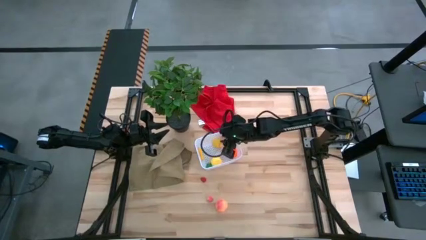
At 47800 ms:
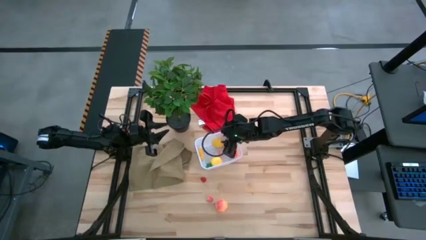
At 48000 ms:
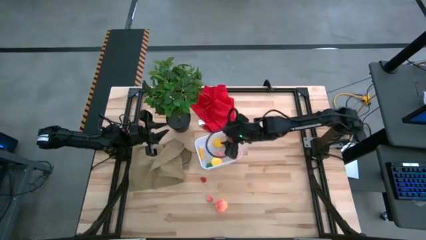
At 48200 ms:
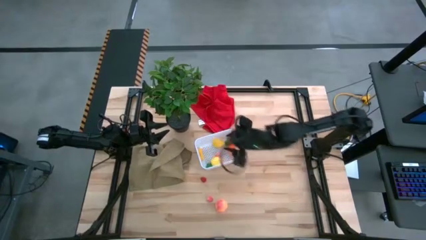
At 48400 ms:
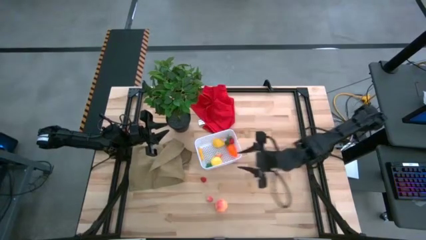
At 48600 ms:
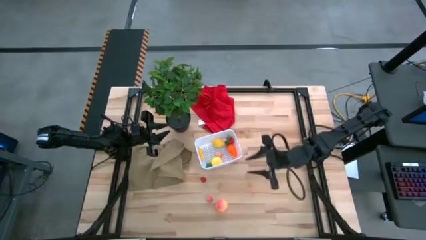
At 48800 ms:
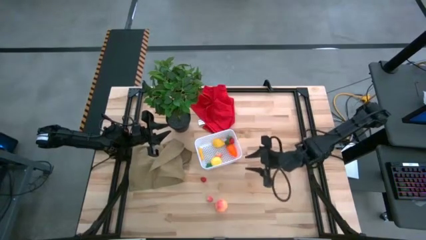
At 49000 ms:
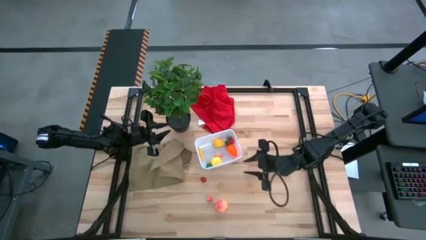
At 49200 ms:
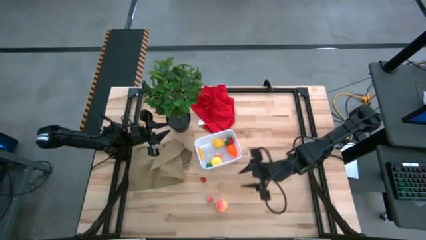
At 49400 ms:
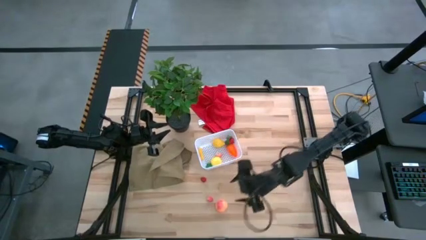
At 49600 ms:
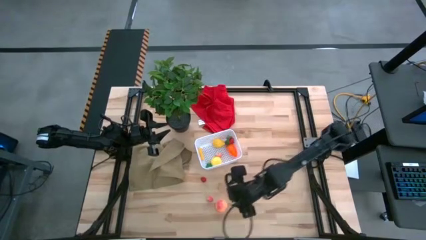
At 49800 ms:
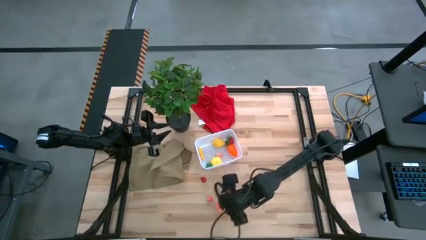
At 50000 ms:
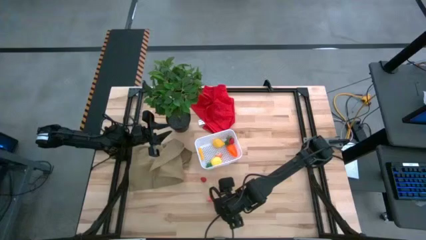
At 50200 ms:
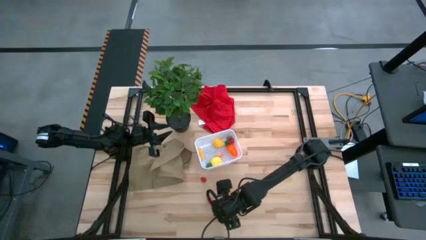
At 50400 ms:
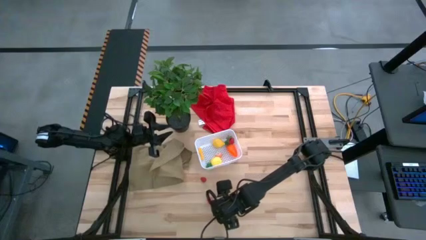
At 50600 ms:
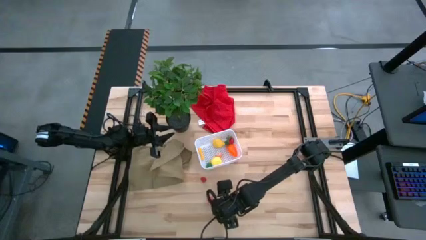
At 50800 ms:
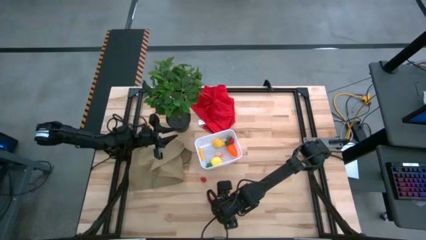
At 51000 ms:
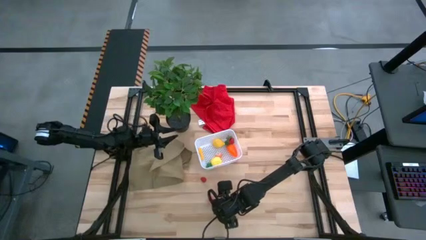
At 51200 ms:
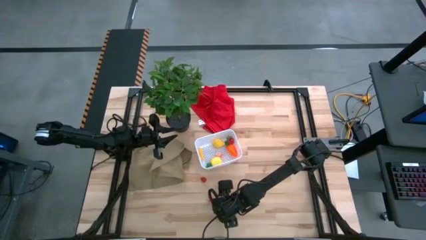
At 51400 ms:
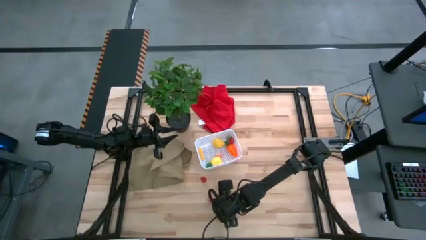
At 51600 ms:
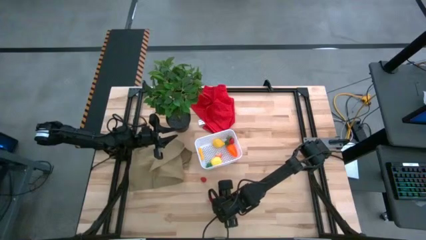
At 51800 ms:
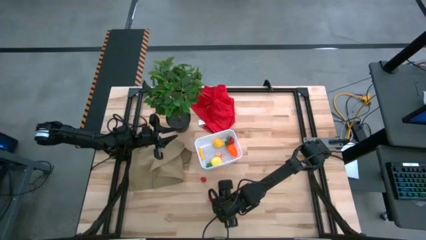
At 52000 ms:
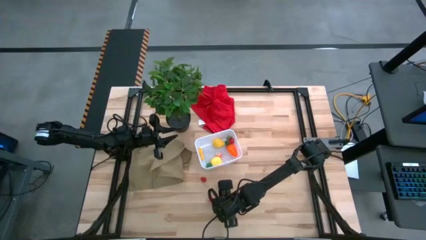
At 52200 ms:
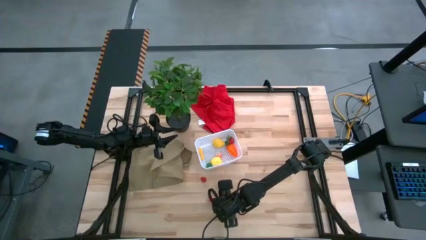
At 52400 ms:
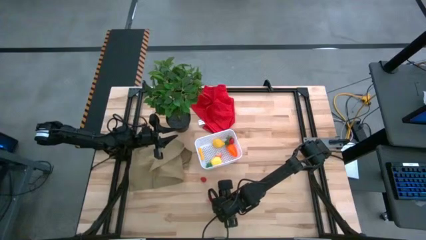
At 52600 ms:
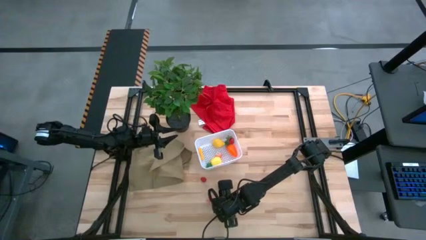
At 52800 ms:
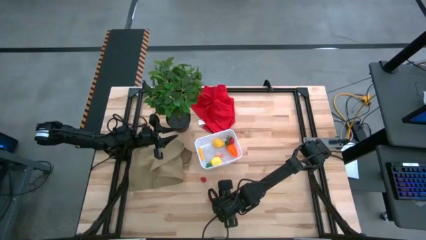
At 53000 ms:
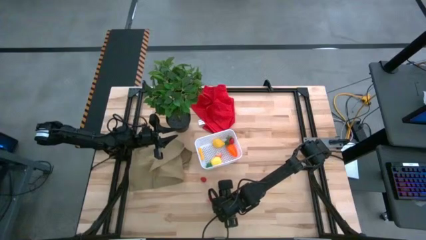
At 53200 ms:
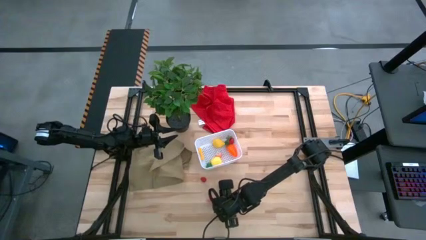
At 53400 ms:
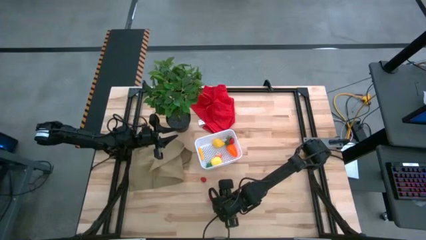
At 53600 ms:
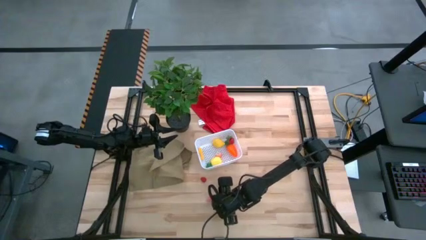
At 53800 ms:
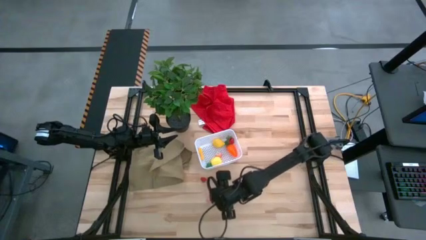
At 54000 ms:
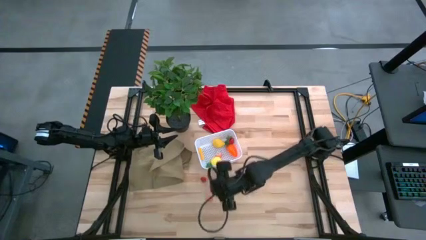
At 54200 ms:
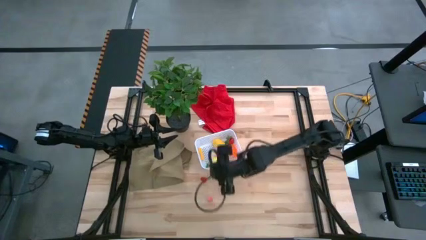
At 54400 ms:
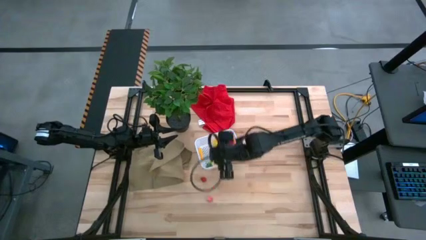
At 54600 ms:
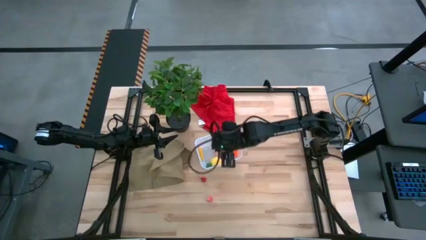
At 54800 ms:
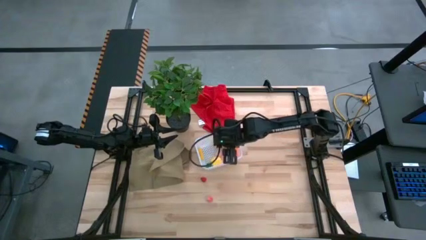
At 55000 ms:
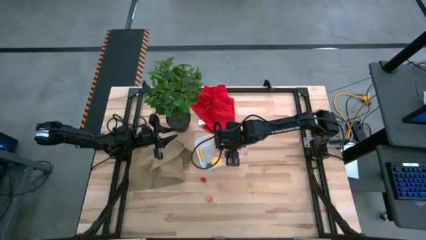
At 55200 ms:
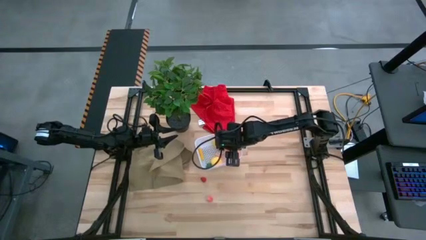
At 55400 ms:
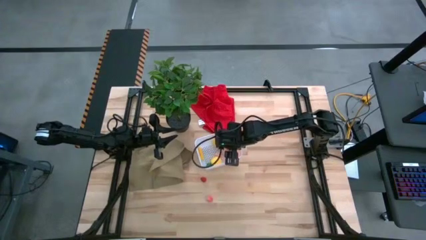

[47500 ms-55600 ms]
Task: Pick and placing Produce into tupperware
Put the orange peach into the bin

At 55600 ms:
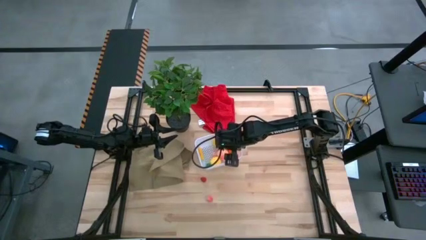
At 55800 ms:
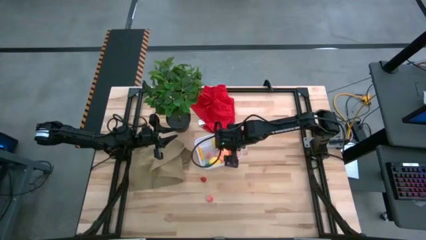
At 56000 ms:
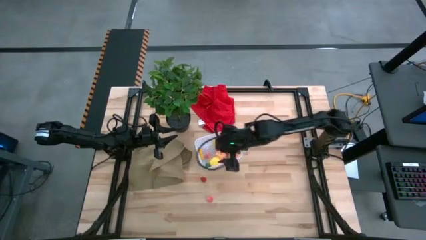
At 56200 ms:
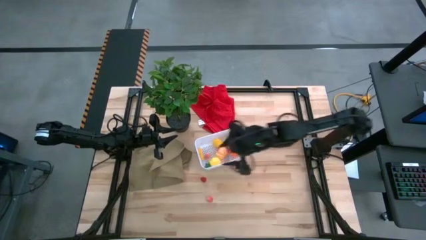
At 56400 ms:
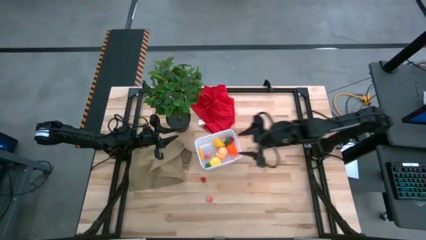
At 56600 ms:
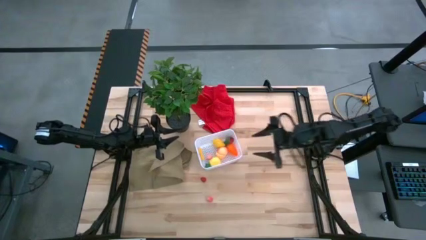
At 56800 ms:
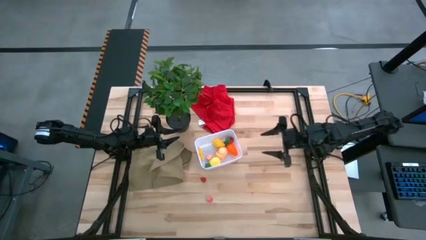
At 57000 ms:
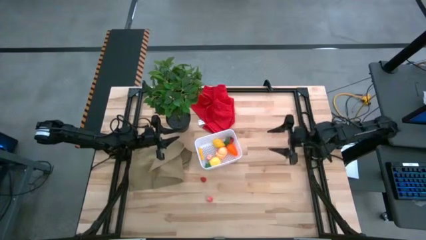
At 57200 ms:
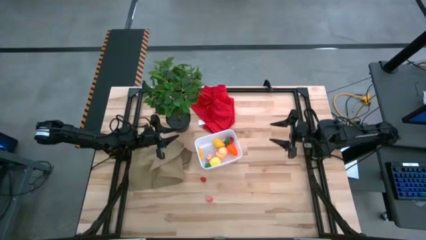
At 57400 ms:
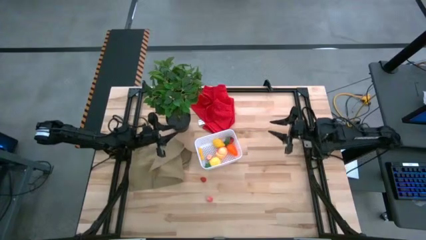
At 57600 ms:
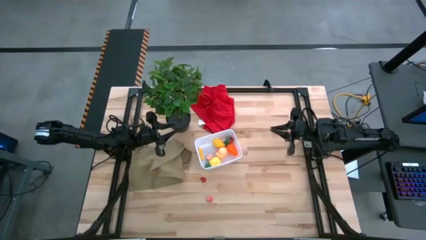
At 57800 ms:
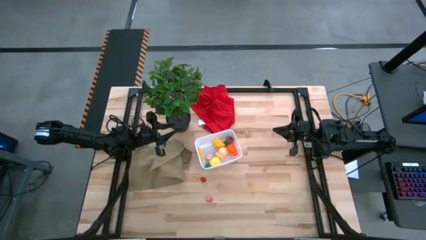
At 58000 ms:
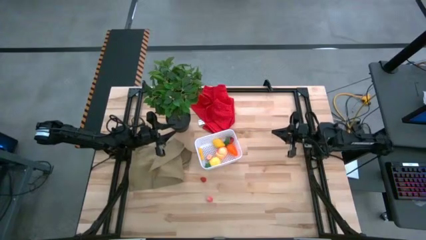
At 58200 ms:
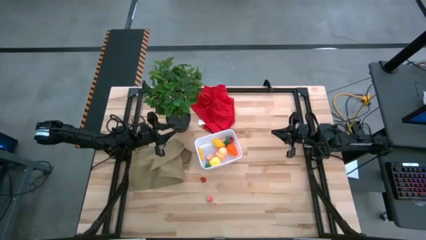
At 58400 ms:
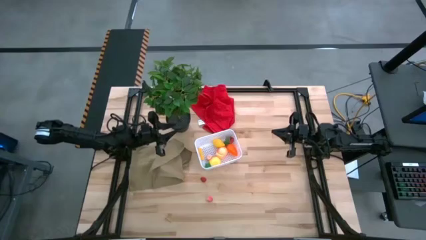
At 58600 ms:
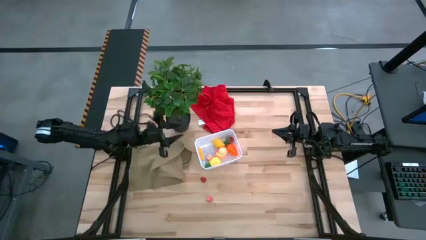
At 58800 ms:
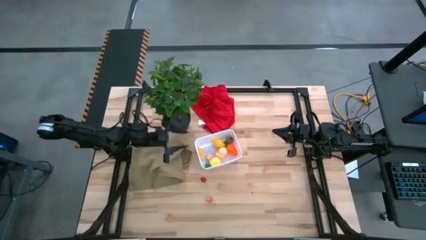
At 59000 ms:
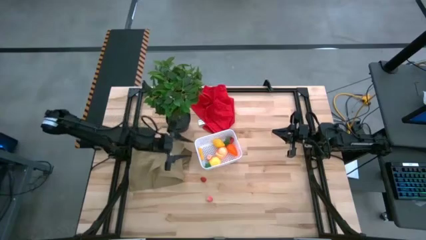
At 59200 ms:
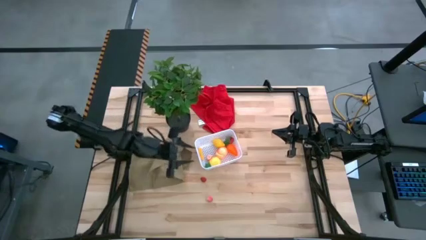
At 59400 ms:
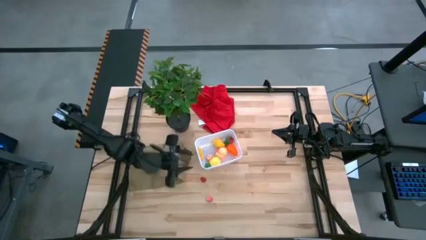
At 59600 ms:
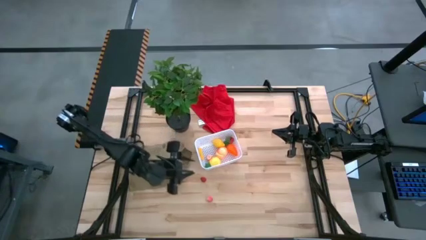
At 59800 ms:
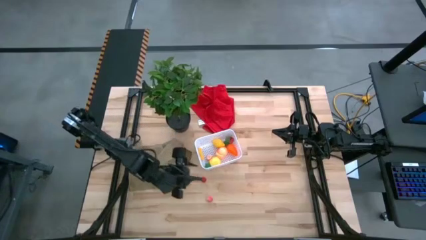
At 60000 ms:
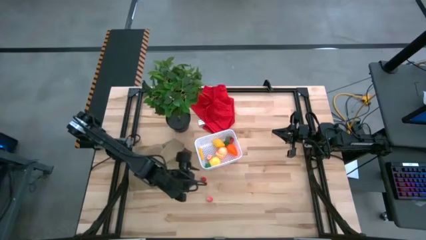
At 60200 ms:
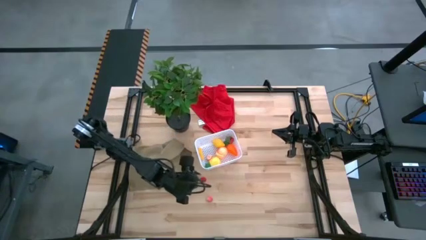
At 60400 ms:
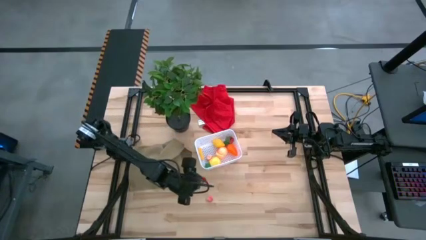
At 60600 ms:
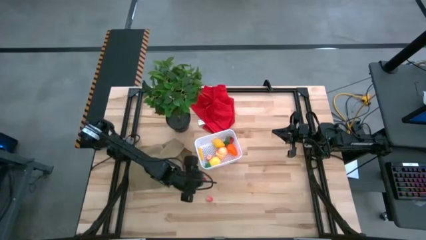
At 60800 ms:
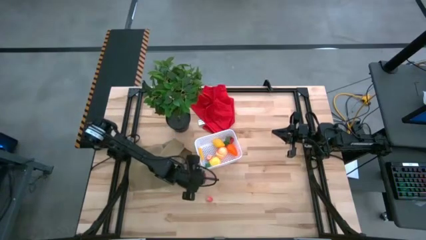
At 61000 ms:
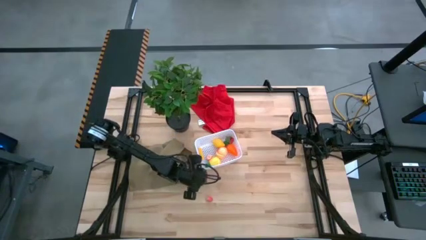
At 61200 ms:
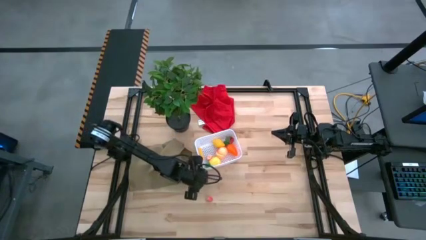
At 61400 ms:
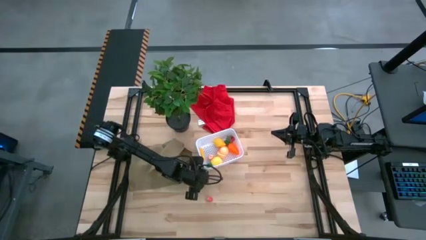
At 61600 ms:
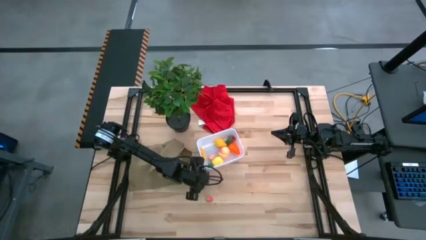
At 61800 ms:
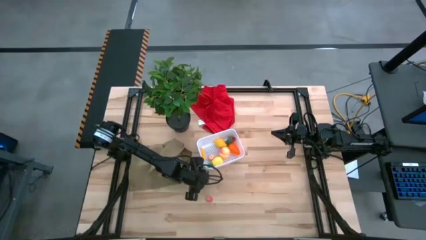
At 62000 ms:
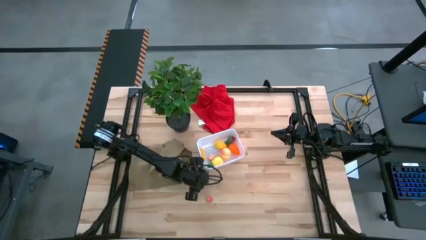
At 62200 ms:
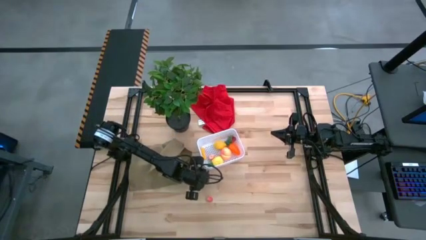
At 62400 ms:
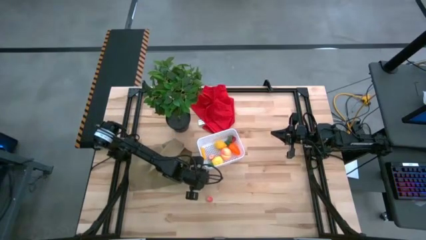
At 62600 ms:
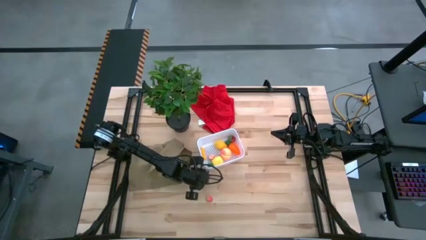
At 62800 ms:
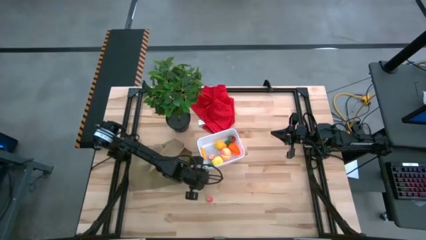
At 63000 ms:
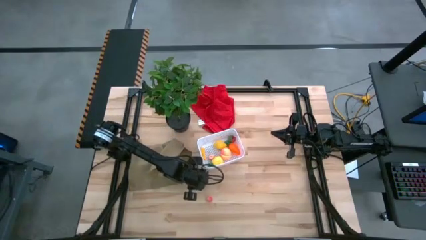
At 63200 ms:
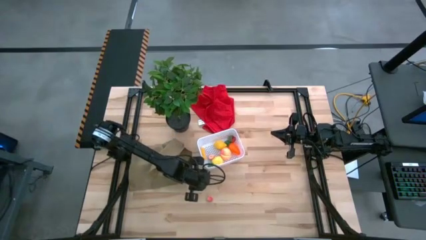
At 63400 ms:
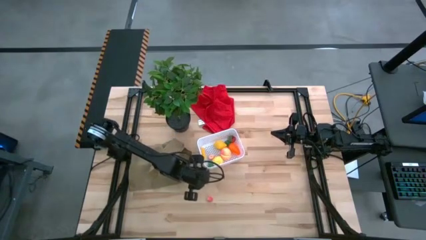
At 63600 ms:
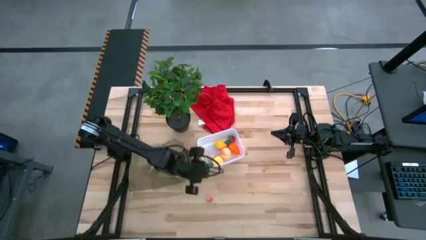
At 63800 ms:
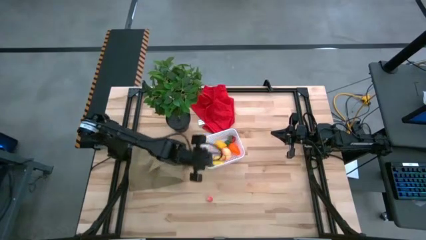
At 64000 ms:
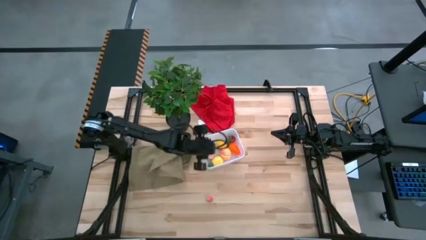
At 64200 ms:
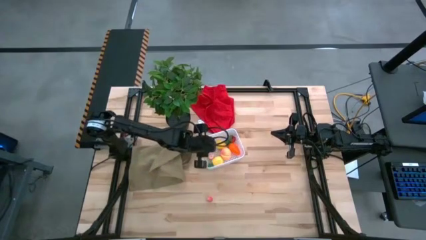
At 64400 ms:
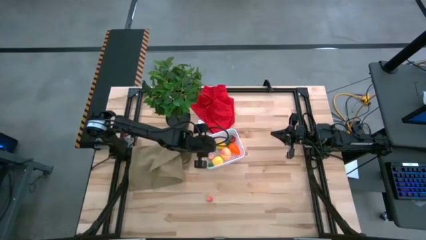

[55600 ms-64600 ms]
Put the red raspberry into the bin
